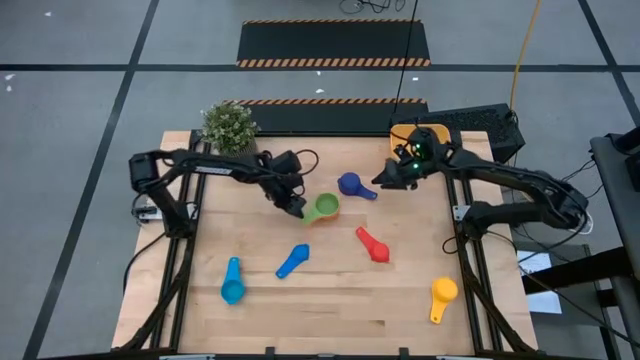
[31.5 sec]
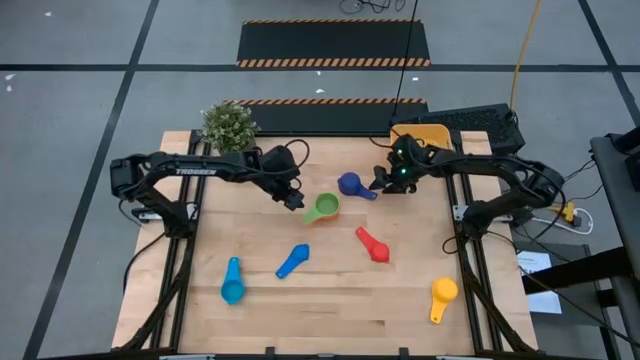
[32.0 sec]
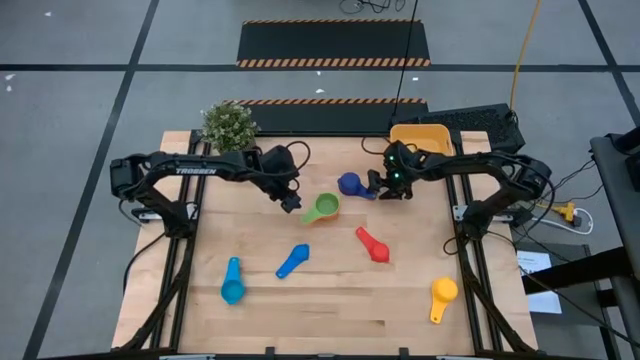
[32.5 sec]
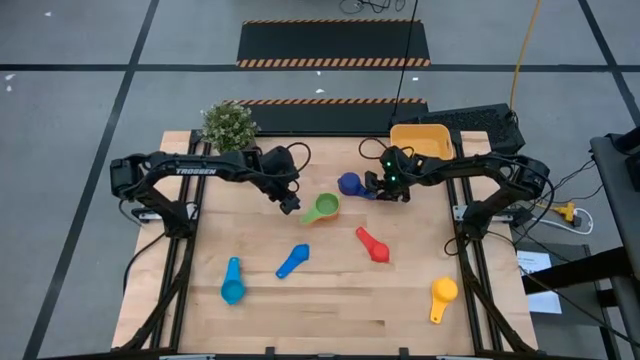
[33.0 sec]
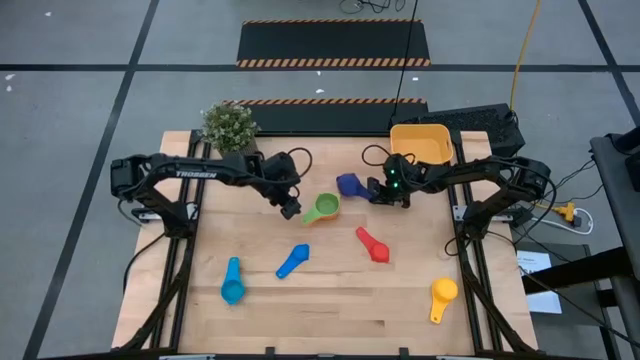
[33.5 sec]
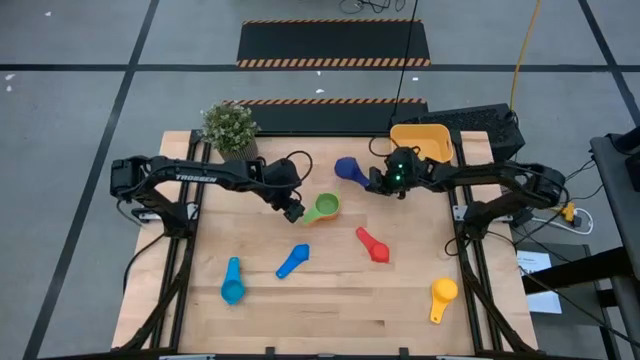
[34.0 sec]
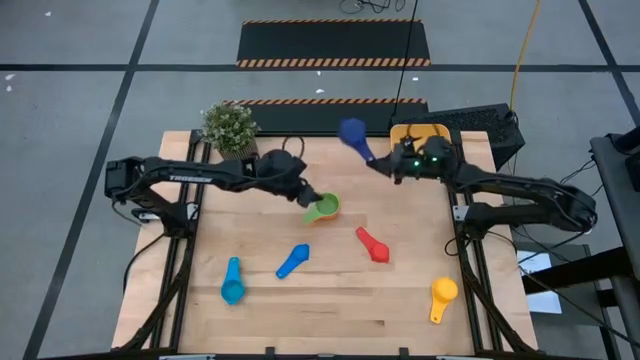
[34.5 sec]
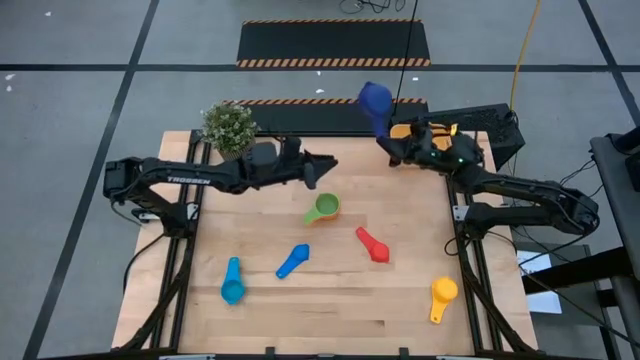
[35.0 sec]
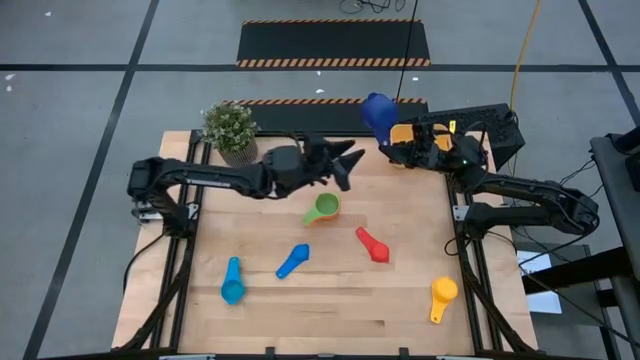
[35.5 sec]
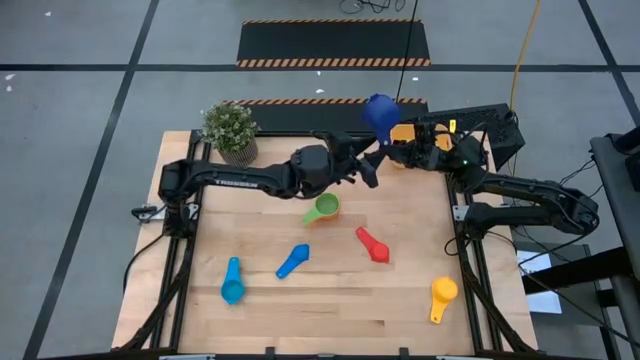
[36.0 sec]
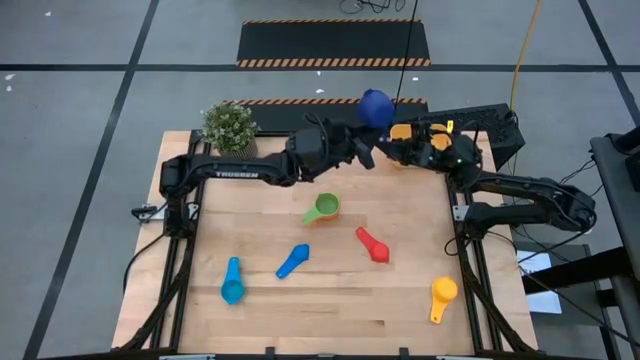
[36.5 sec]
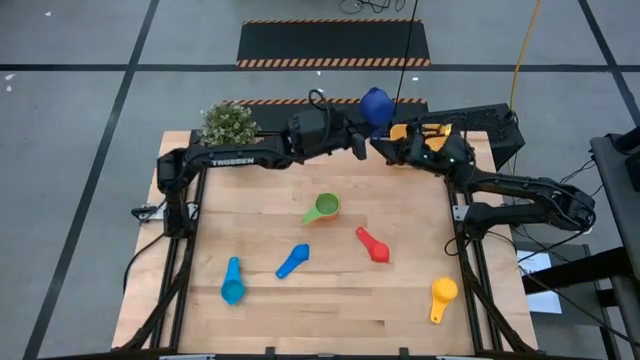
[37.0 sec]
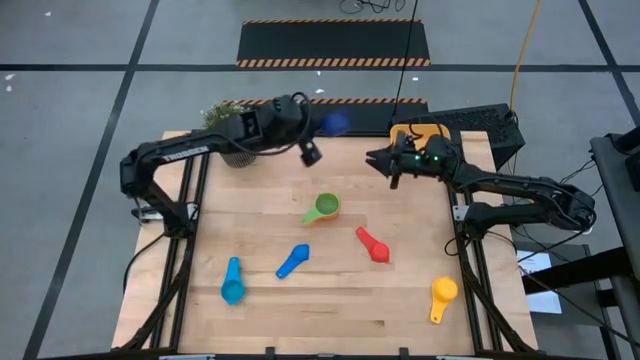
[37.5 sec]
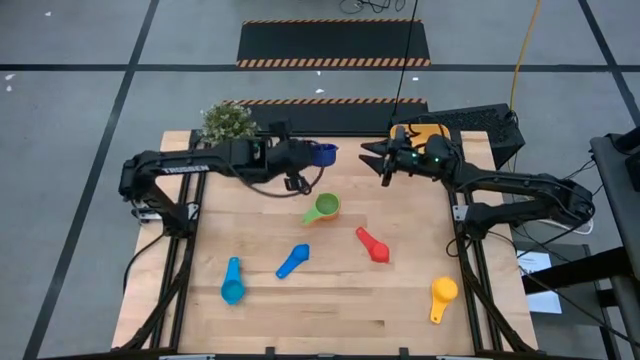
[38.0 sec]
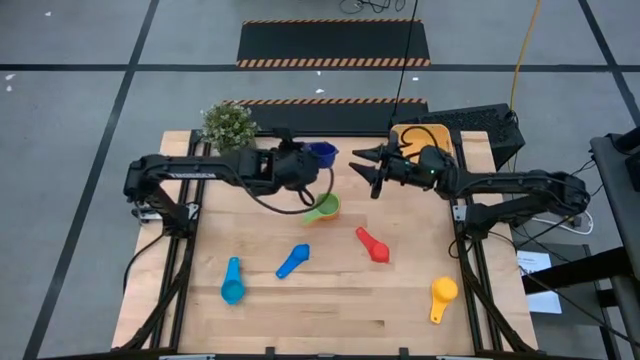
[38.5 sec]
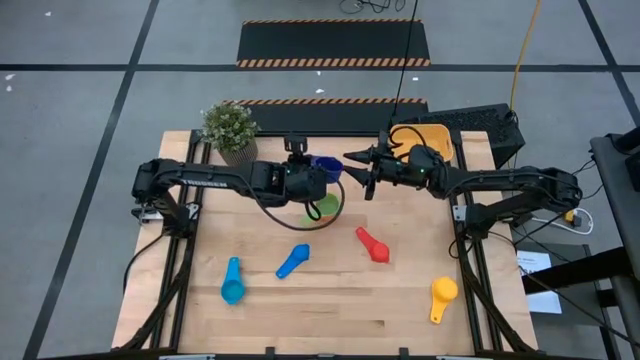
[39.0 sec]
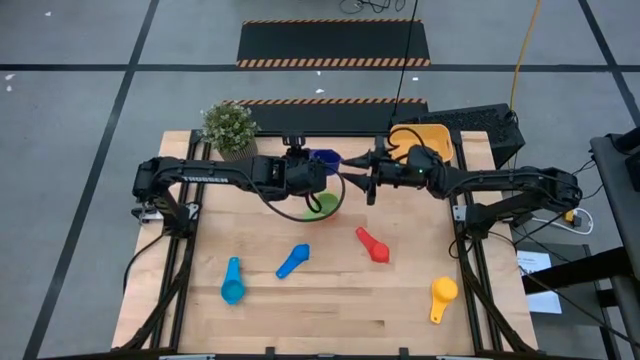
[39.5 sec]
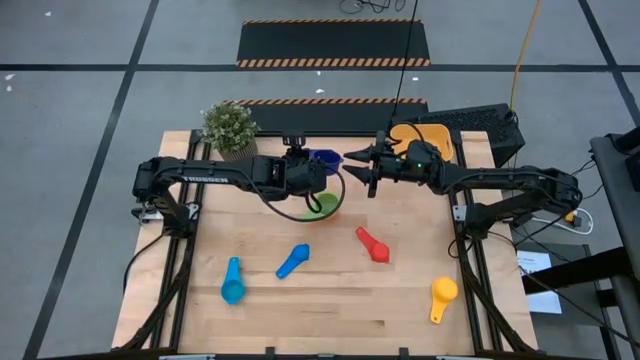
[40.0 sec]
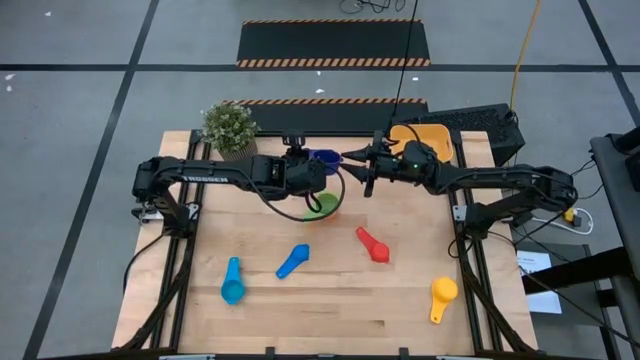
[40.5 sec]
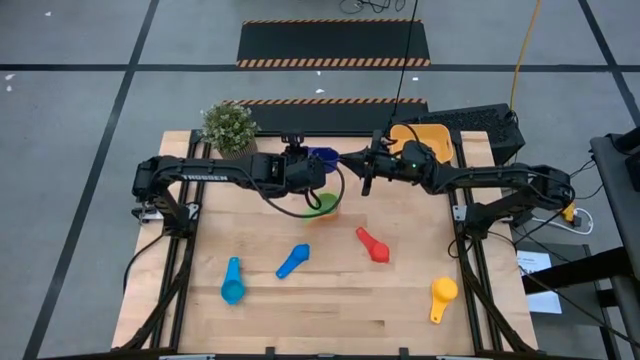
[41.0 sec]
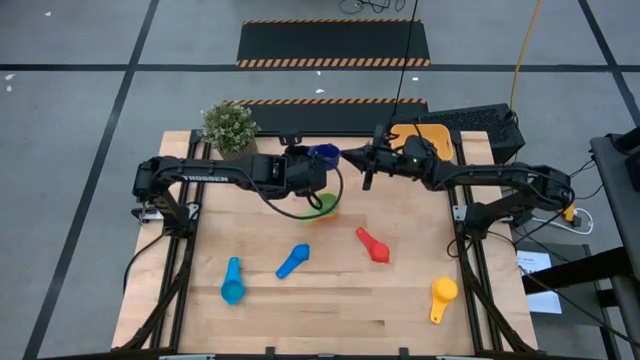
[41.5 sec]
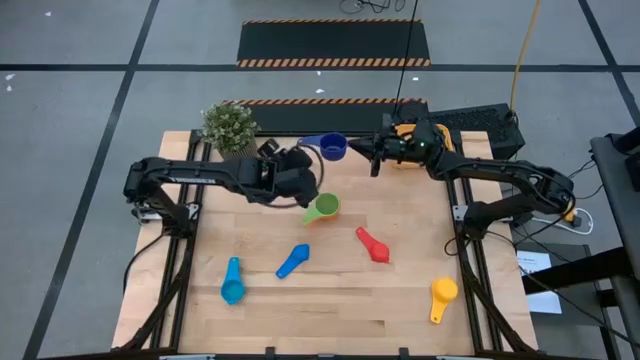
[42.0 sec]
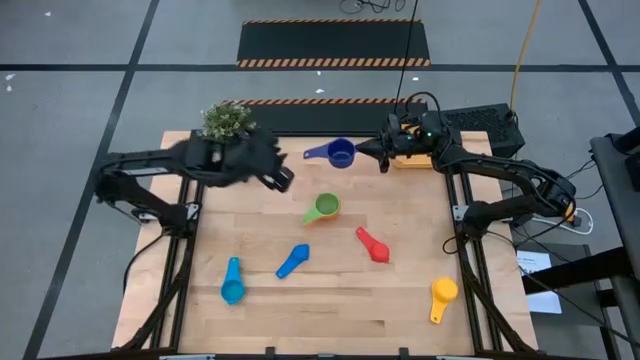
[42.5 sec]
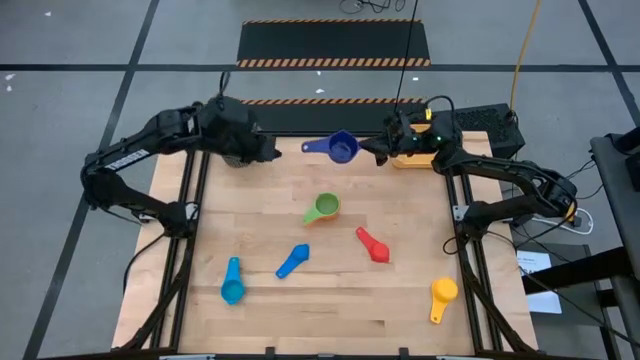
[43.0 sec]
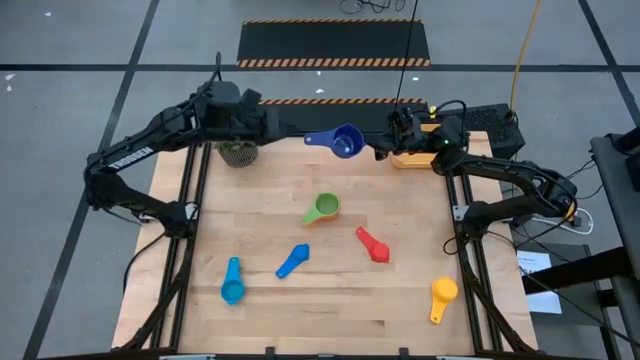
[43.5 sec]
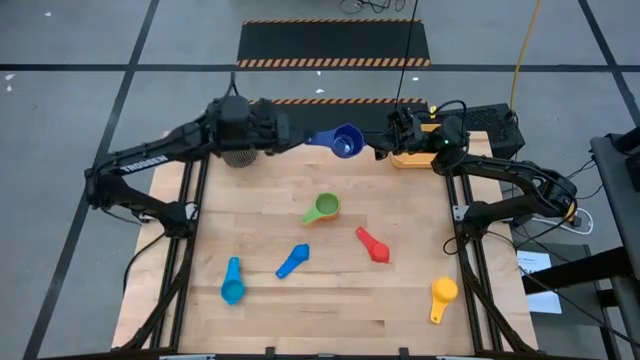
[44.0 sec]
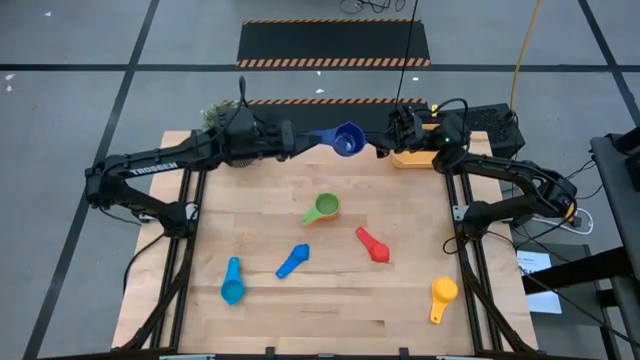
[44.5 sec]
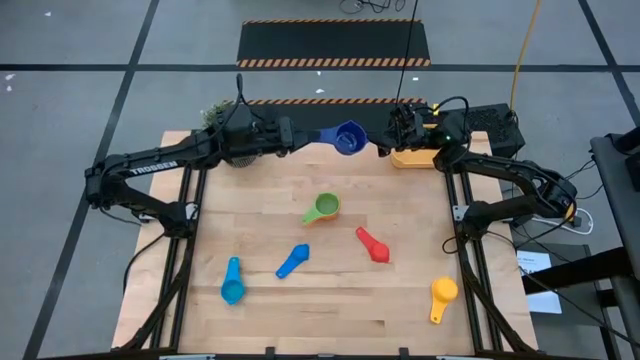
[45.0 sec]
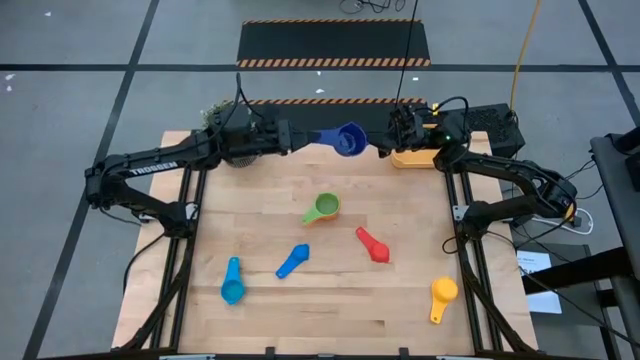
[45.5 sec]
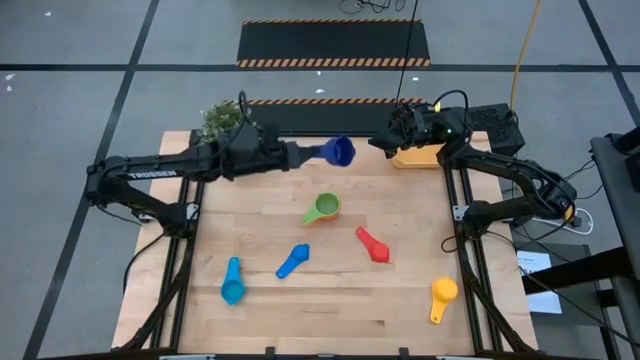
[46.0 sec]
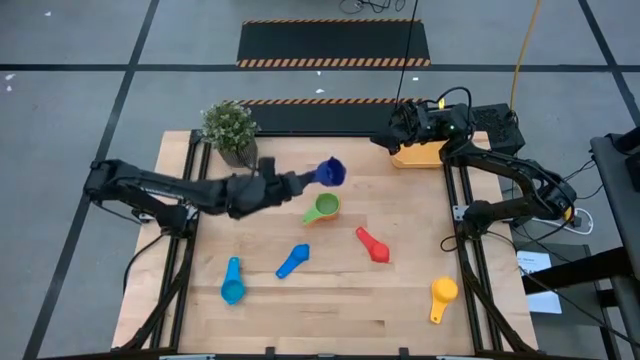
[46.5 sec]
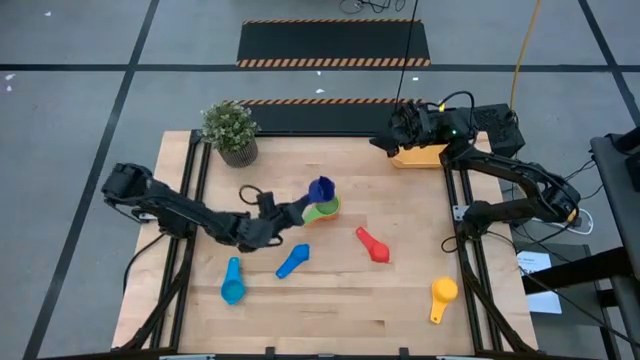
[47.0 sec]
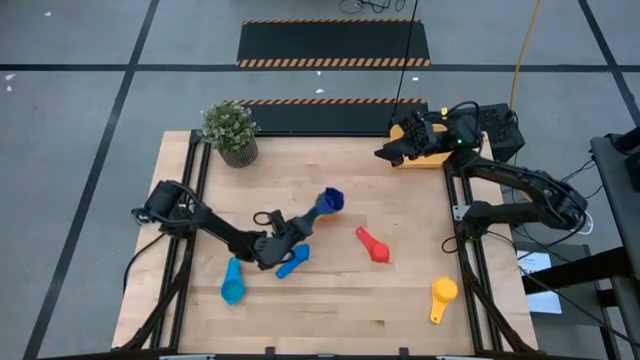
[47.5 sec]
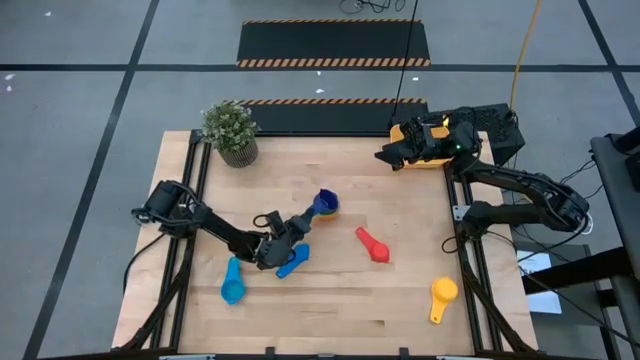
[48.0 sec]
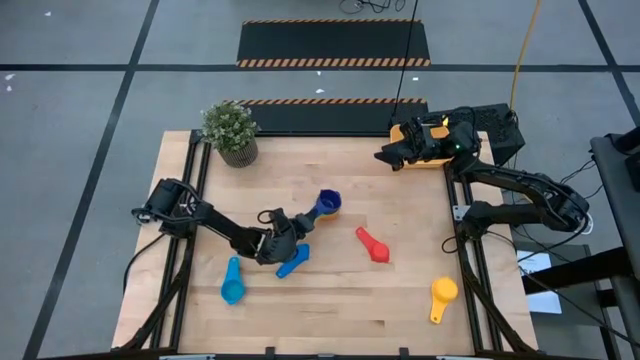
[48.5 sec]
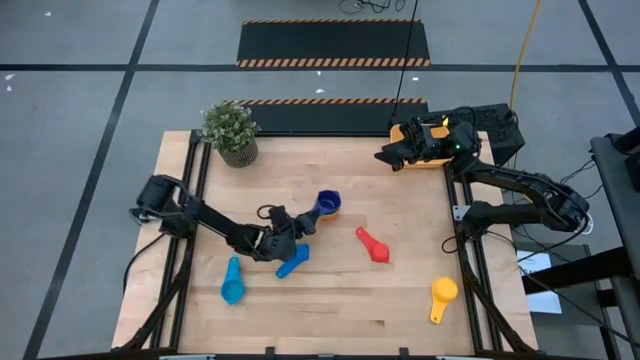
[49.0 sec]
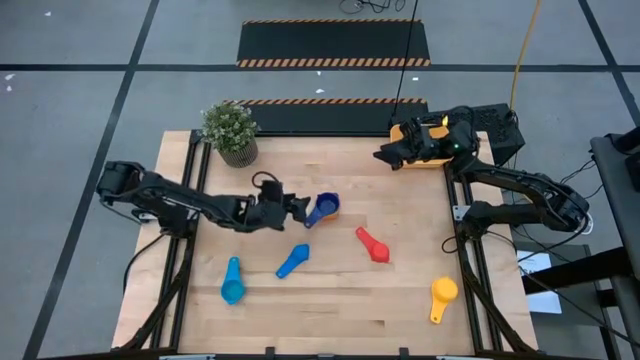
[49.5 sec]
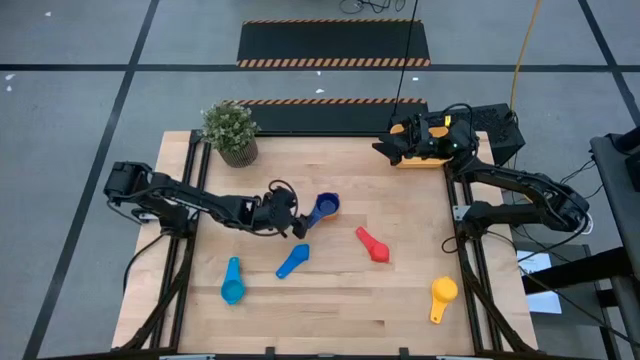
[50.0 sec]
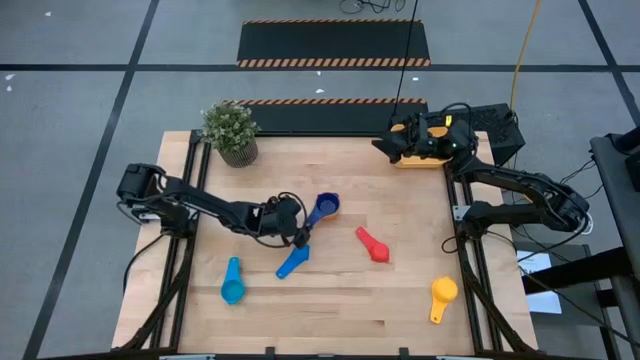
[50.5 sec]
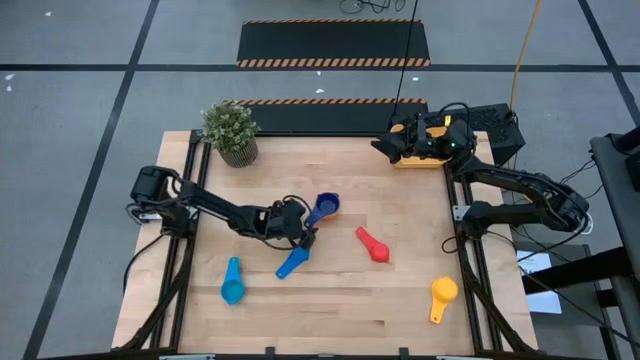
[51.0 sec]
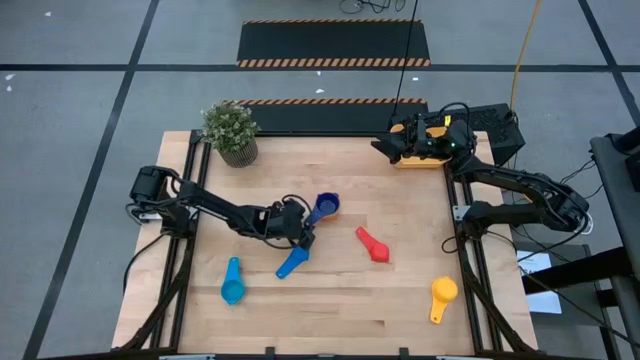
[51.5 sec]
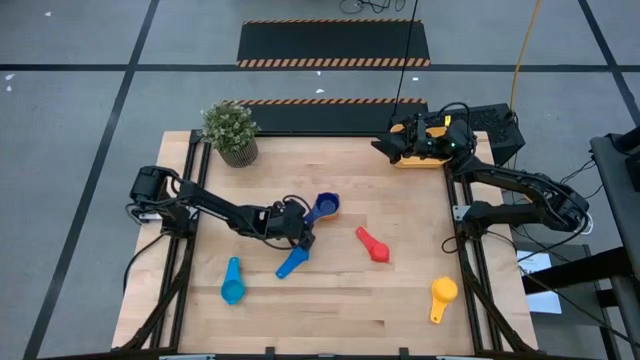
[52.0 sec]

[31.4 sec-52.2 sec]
Task: Nest measuring cups in basket
Stack the dark blue measuring cup on top of the green measuring cup

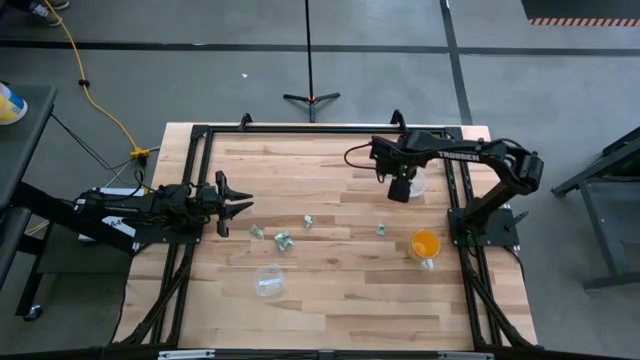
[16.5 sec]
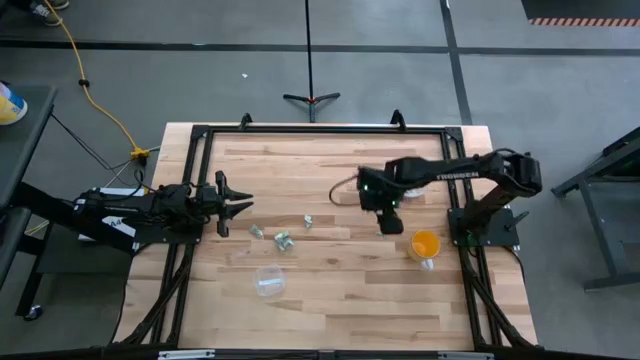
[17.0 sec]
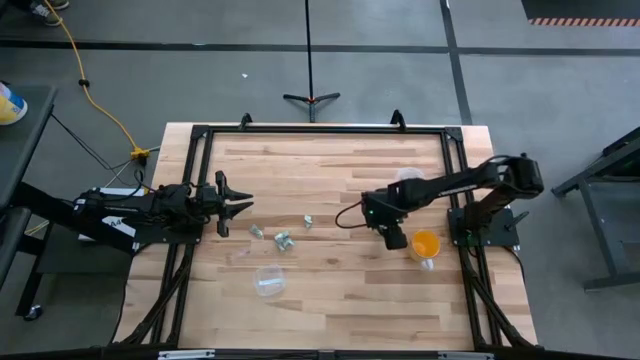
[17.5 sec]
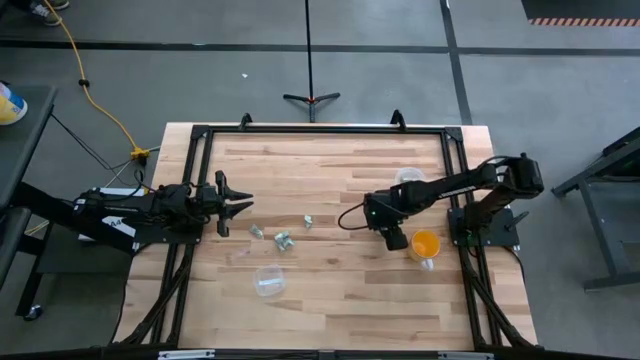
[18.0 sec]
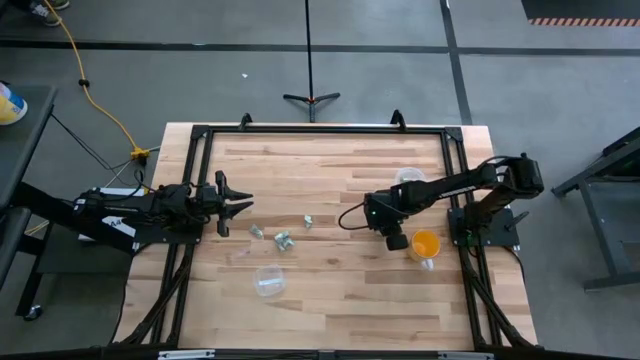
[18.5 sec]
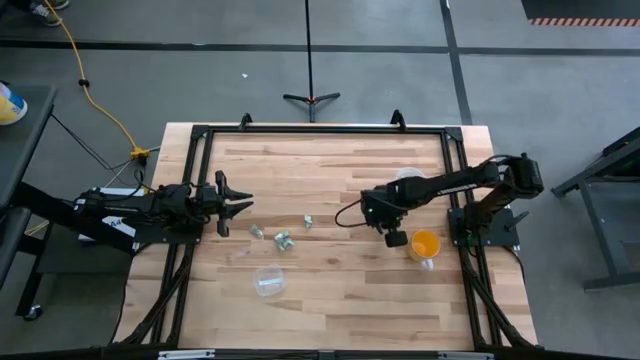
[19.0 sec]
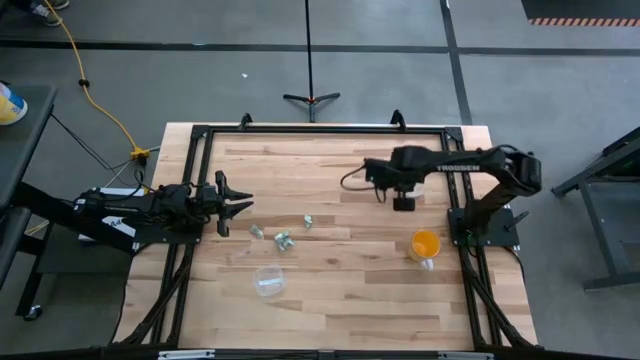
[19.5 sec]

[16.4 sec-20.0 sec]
Task: Pick and place Stevia / Truvia into bins
Put the stevia packet into the circular container
